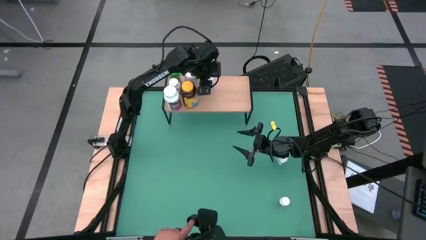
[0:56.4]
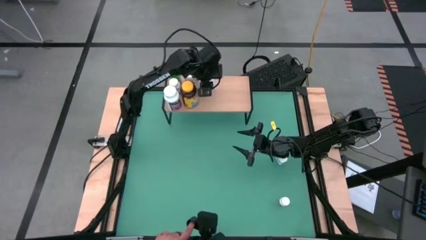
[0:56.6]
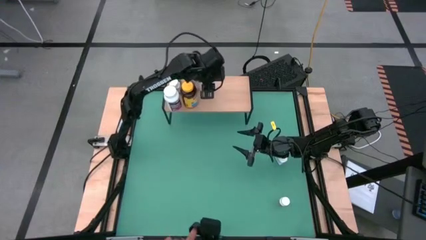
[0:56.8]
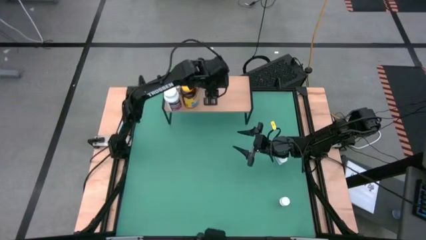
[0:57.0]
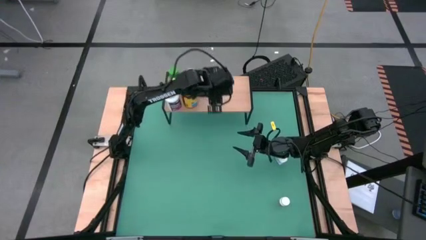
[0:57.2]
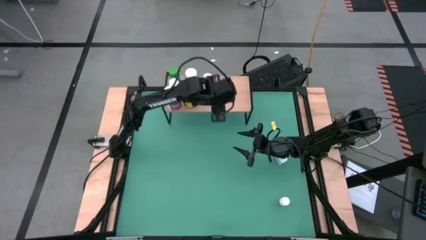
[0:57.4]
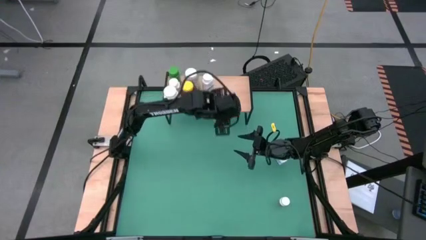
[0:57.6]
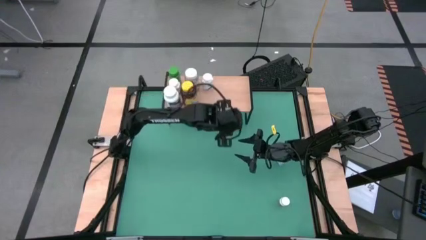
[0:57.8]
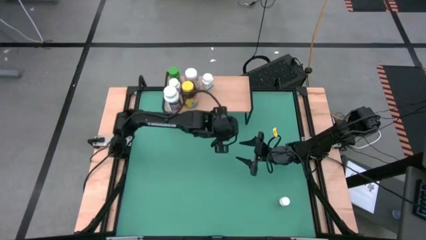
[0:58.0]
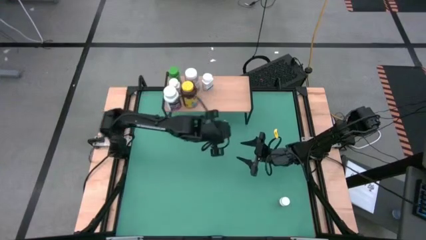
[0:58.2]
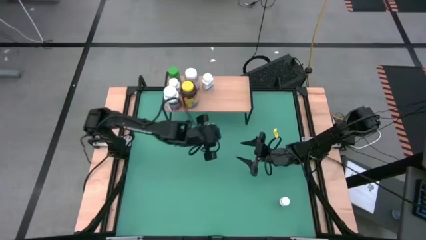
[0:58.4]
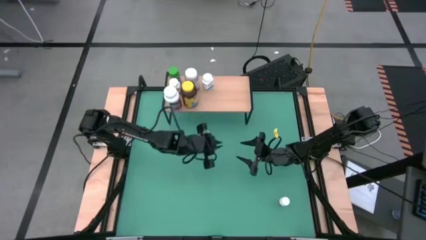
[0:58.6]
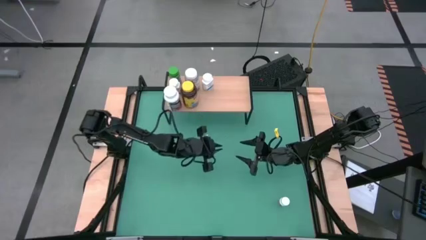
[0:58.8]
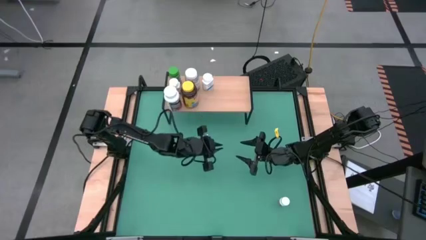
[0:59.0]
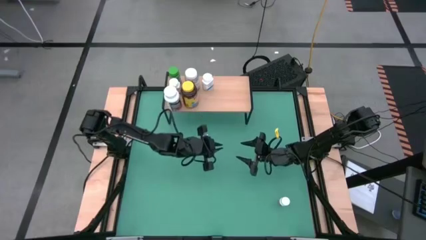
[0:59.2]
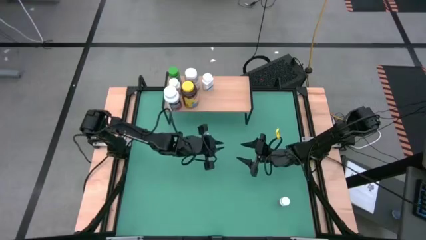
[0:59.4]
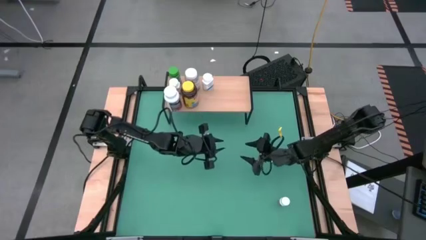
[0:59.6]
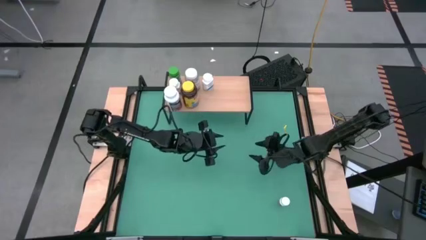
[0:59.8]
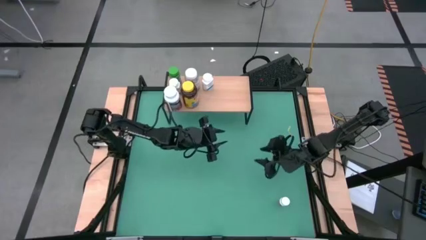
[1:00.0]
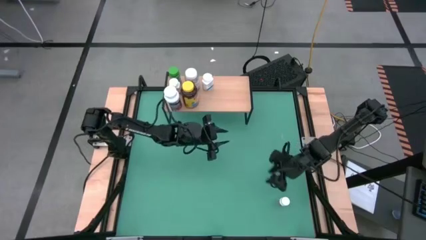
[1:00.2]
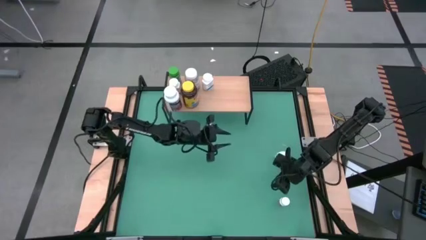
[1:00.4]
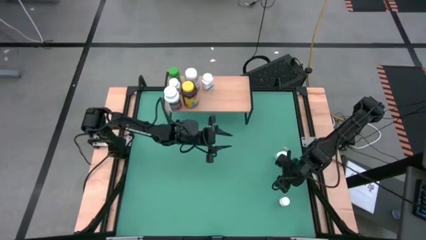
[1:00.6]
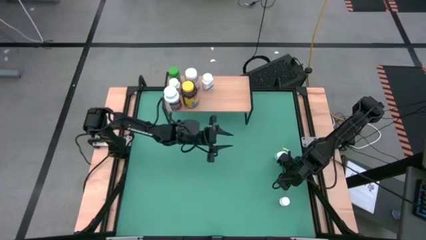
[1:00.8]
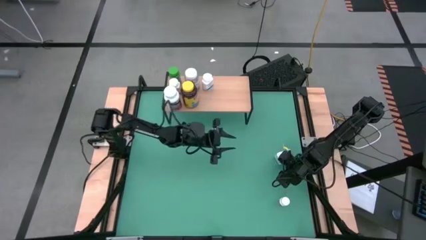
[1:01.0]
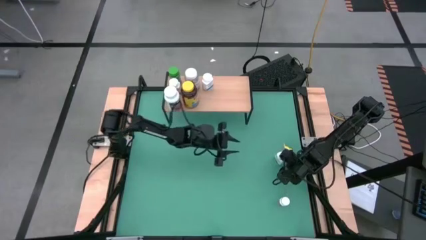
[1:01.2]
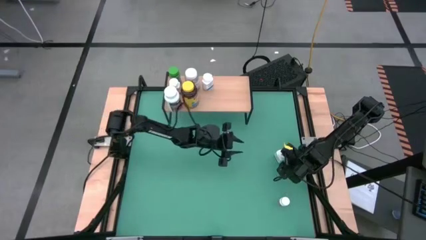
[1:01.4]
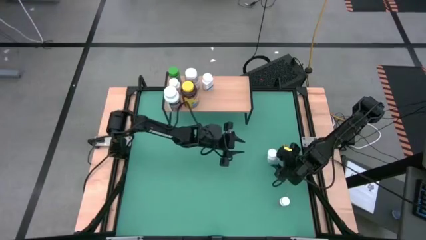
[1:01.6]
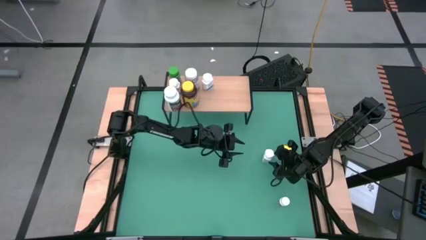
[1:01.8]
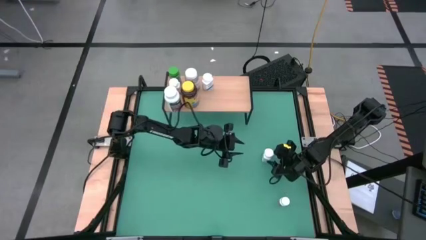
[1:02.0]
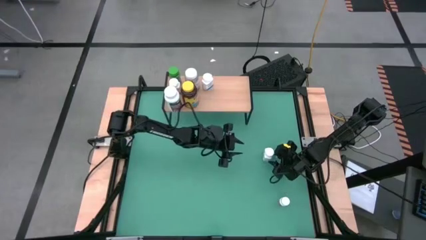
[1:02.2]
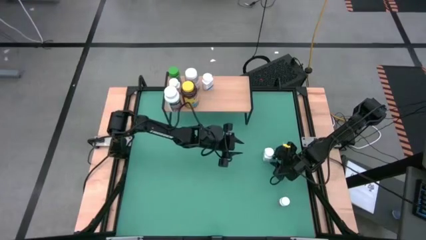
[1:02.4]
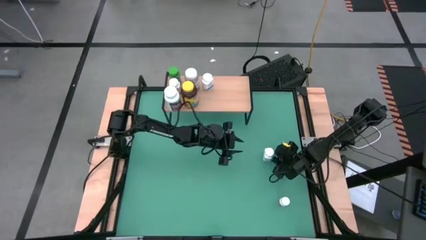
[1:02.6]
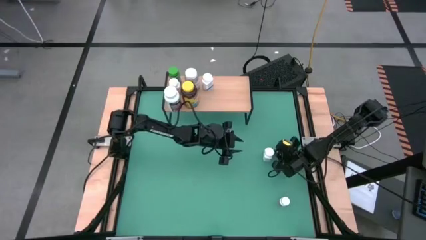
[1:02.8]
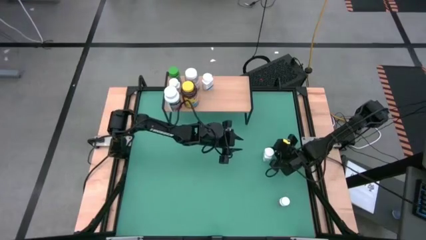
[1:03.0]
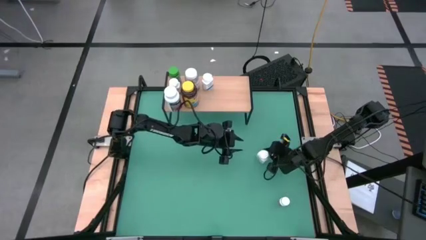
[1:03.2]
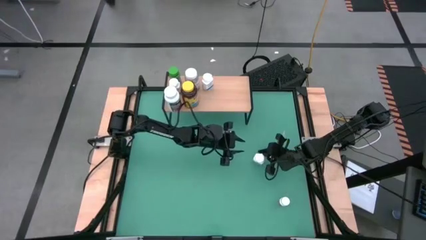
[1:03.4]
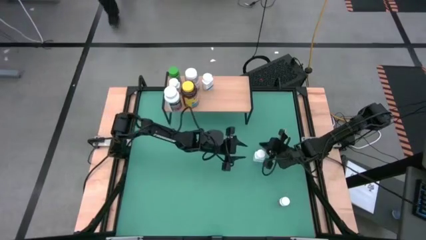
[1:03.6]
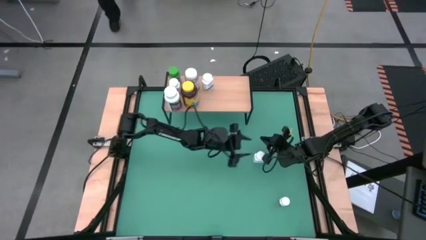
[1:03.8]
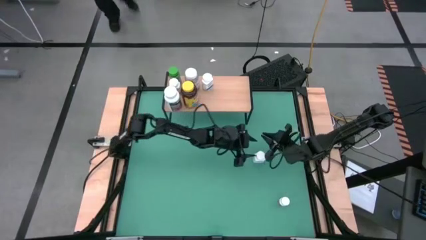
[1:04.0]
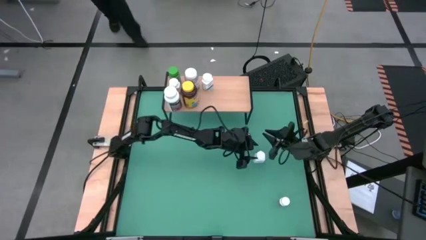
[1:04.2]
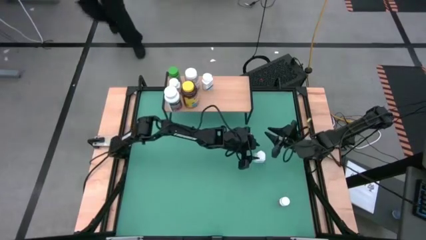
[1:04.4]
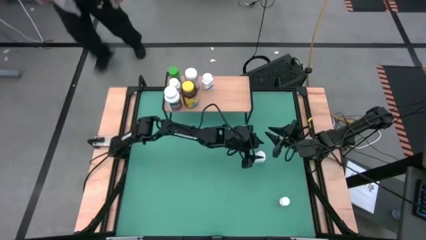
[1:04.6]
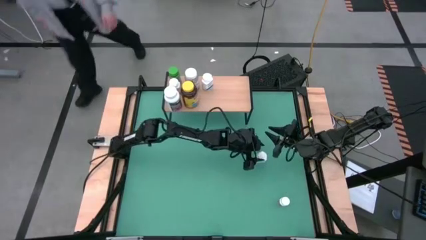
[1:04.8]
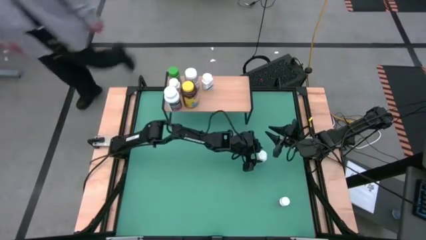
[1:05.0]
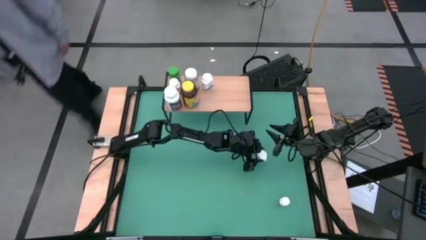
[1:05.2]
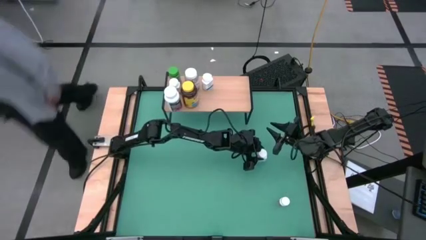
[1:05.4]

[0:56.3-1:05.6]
Task: Pick and place medicine bottles onto shelf by color
Put the top white supplement bottle on the shelf

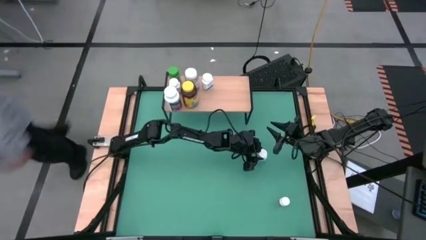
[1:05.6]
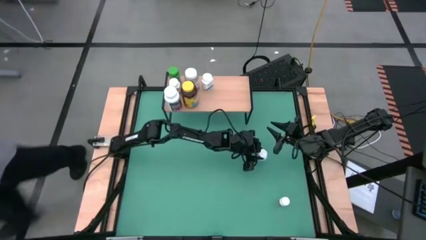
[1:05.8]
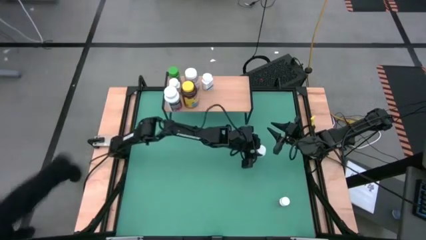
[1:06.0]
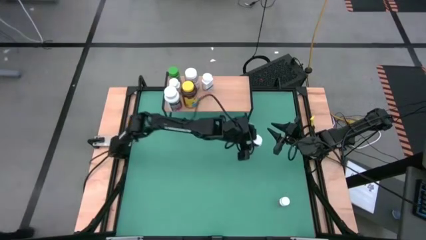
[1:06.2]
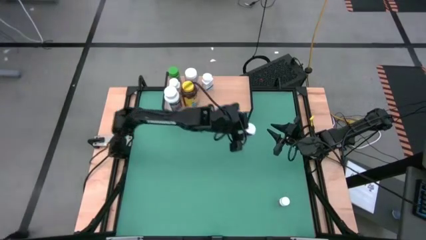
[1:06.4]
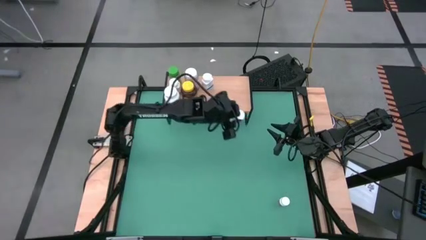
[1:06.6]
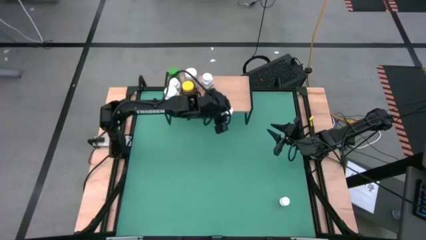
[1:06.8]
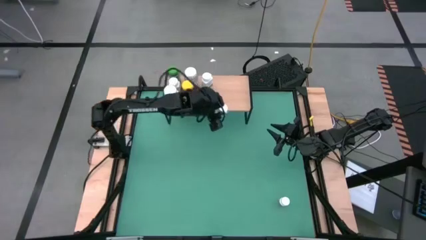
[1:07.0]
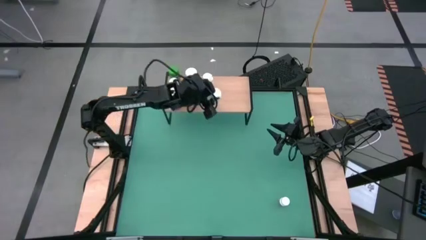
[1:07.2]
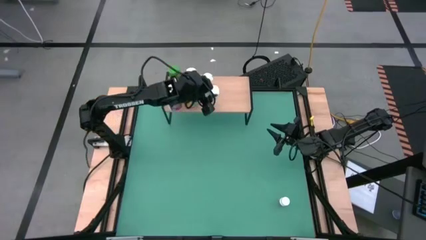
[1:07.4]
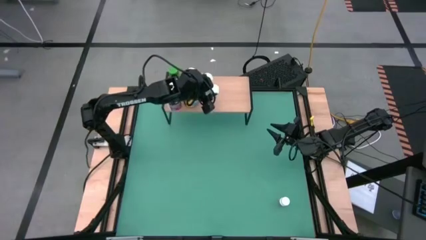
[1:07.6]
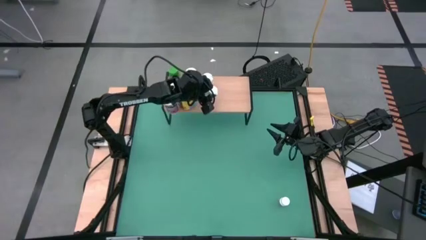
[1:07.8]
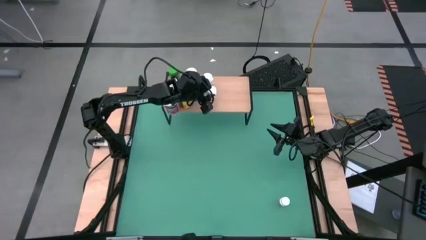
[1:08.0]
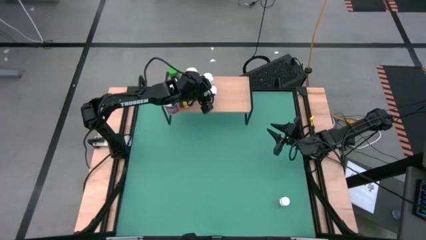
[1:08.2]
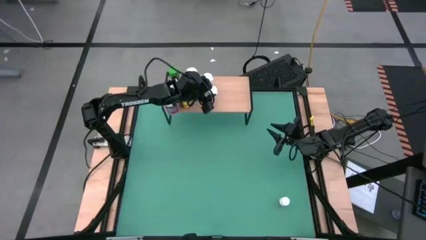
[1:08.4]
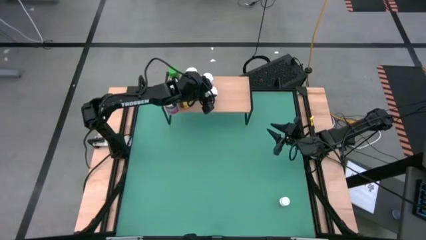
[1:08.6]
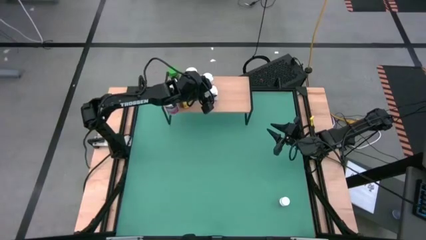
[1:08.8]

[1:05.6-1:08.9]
Put the top white supplement bottle on the shelf

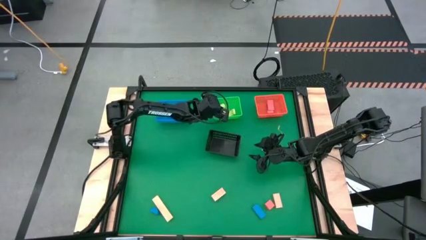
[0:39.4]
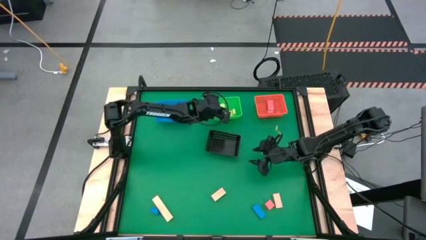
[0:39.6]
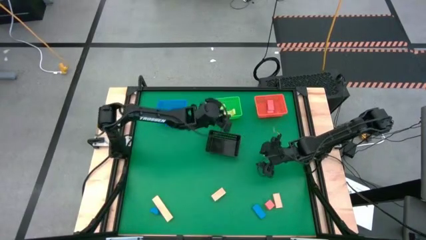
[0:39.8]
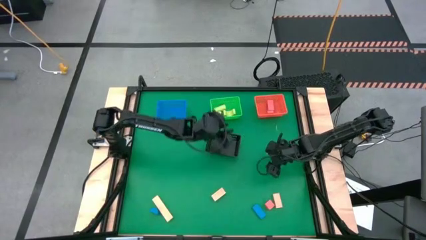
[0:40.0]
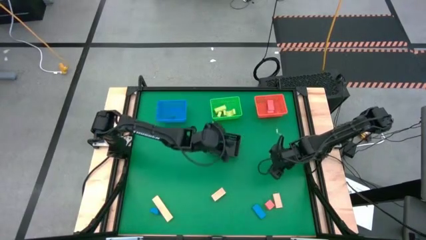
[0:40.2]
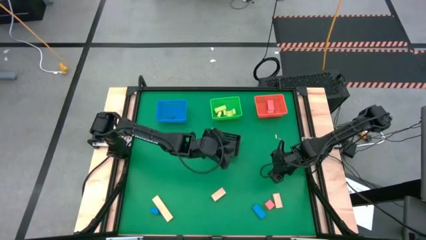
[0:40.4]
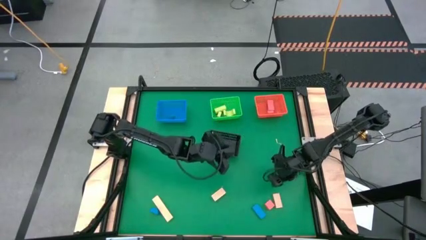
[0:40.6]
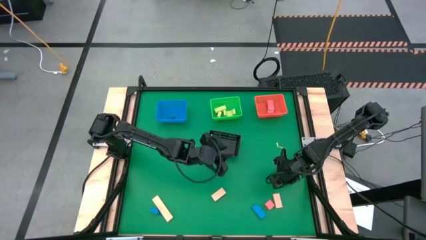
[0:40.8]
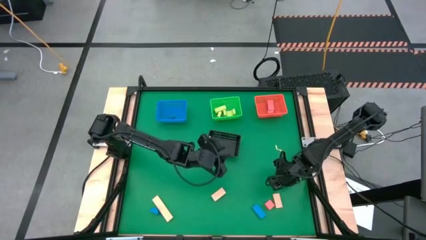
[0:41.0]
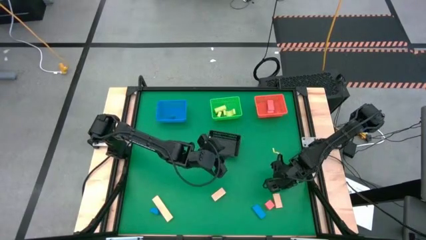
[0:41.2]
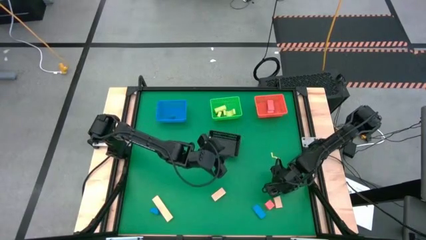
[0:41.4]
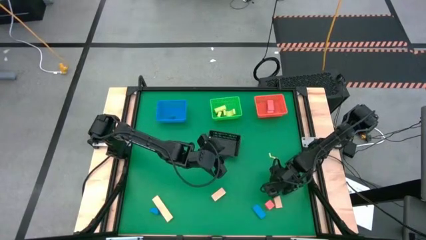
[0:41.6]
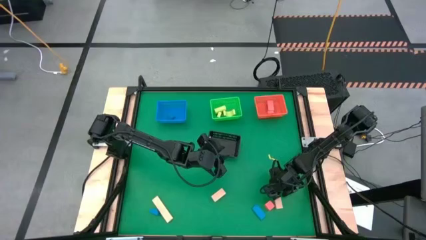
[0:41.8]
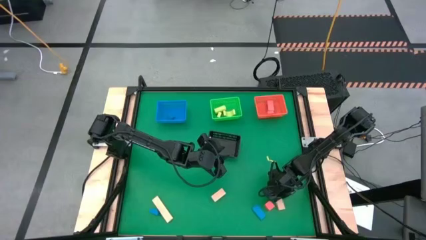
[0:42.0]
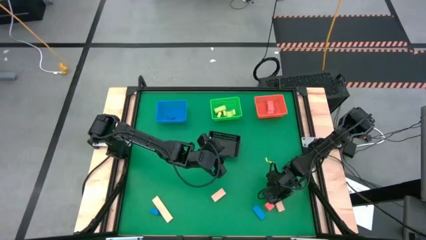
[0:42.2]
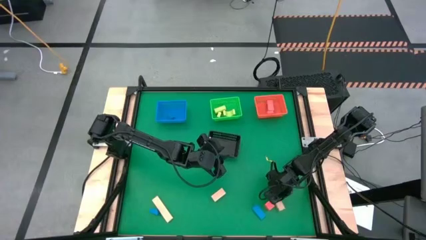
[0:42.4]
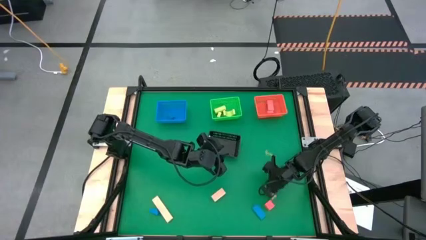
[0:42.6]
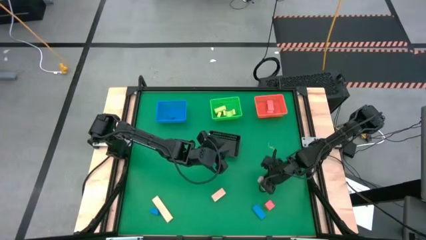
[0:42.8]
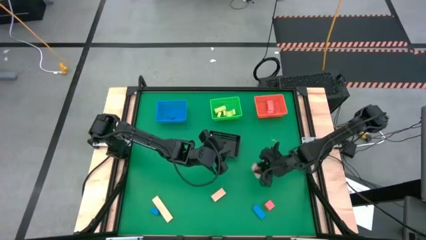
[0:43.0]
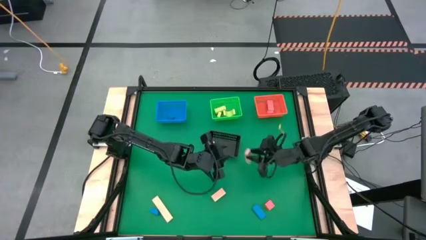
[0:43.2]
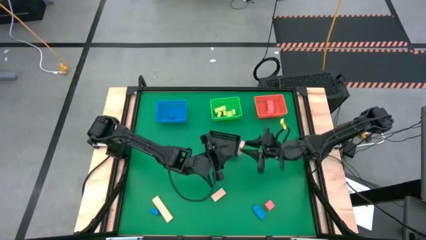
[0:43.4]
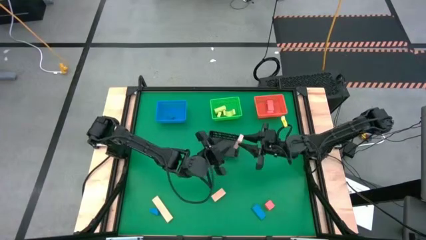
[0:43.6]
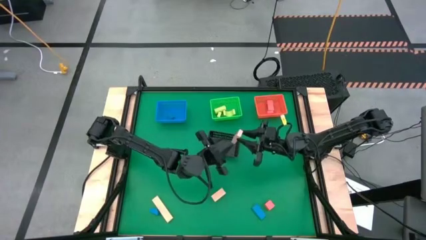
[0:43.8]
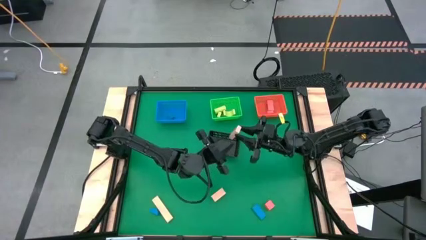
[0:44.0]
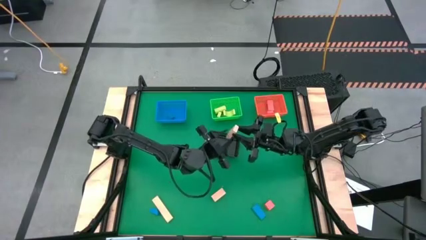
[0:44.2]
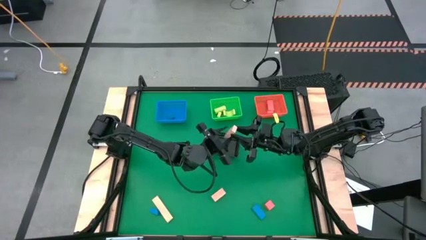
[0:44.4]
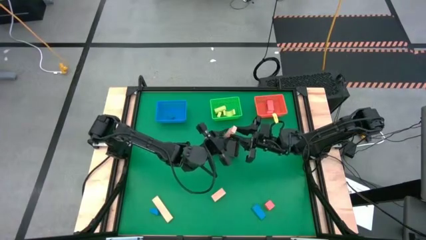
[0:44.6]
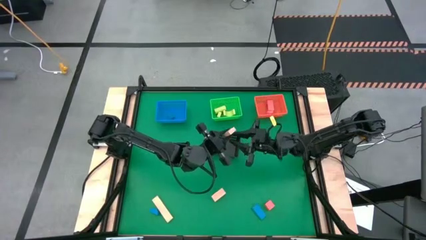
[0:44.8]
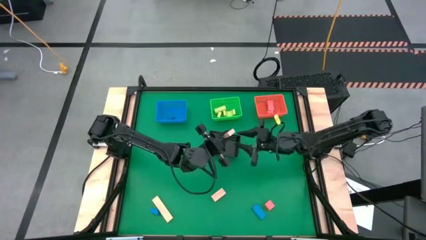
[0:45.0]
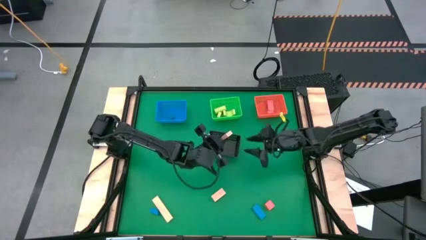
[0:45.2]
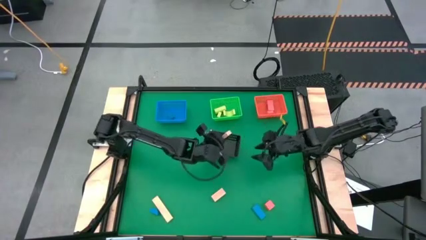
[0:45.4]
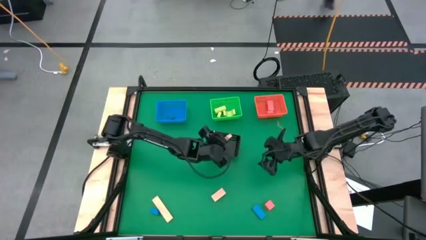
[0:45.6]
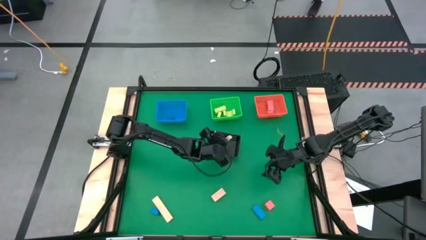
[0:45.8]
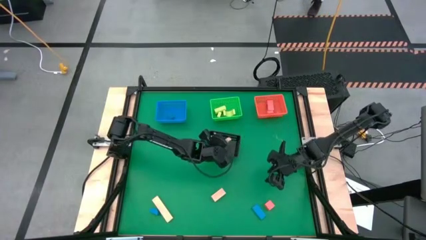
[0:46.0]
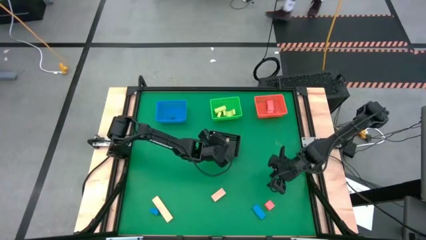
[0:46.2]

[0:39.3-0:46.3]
Task: Sort & place blocks by color
Put the right wooden block into the black bin
